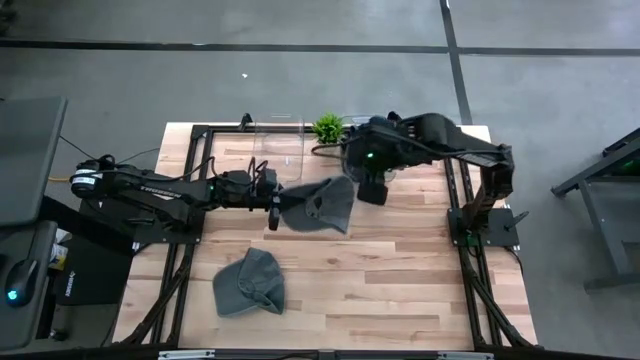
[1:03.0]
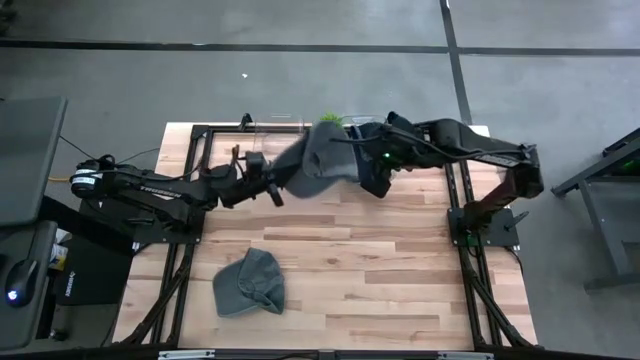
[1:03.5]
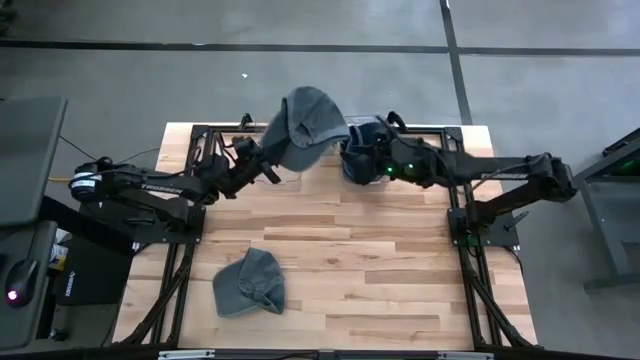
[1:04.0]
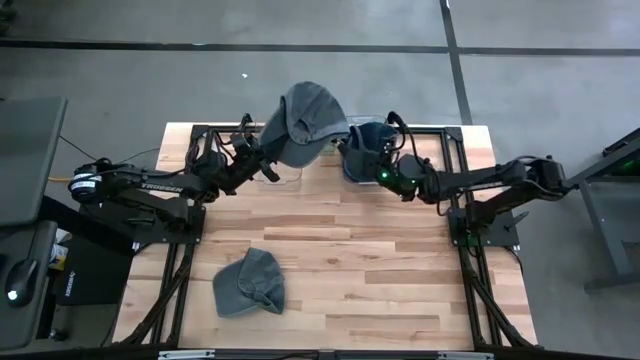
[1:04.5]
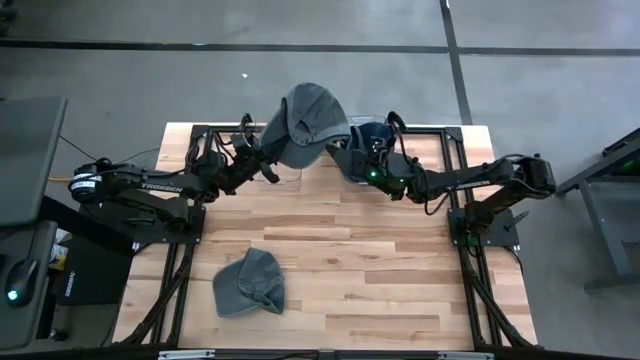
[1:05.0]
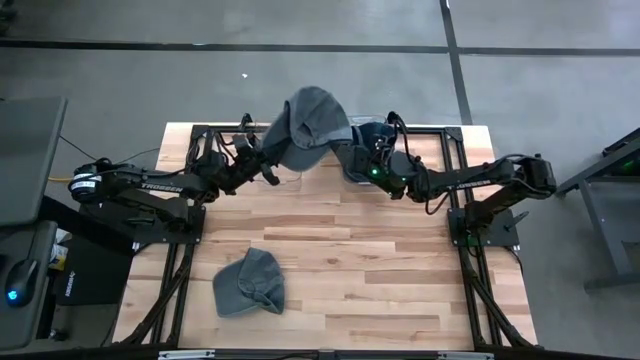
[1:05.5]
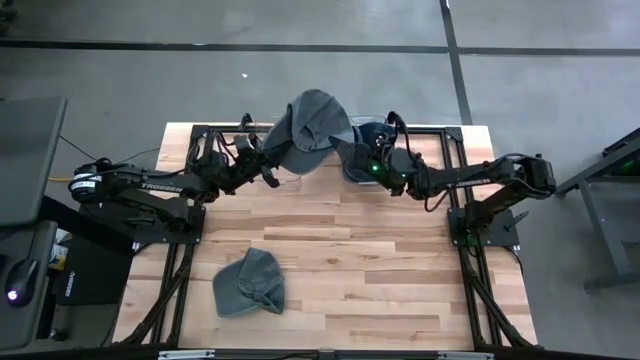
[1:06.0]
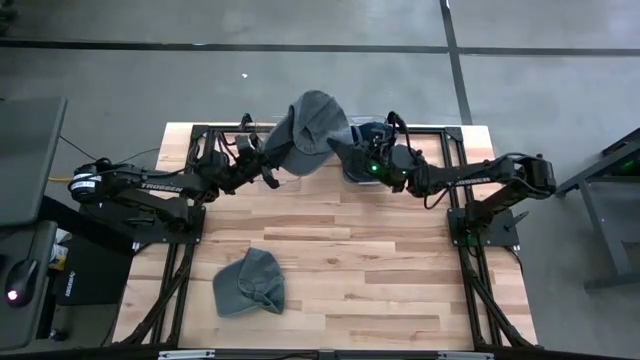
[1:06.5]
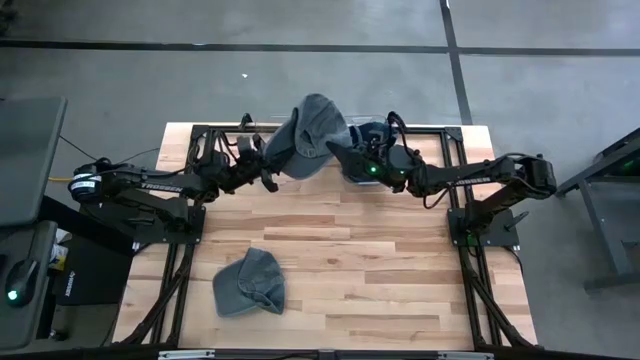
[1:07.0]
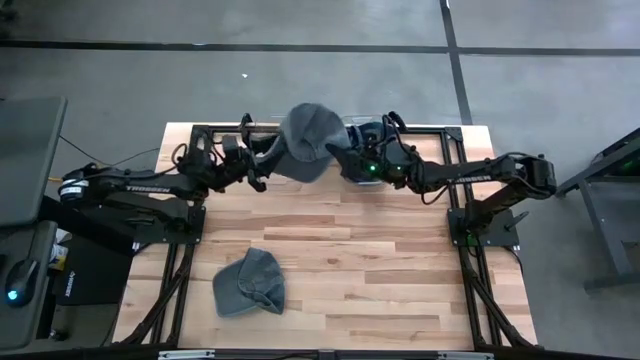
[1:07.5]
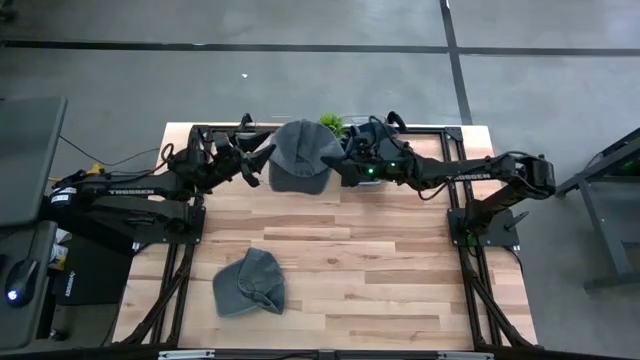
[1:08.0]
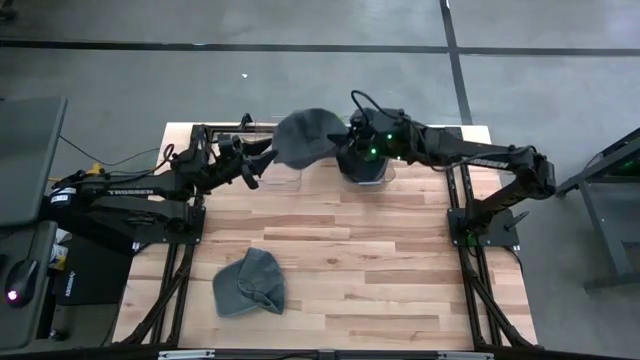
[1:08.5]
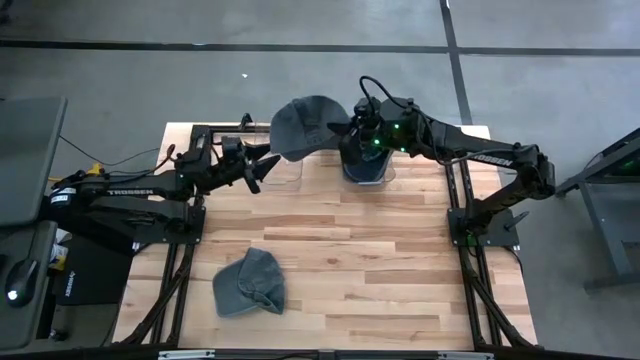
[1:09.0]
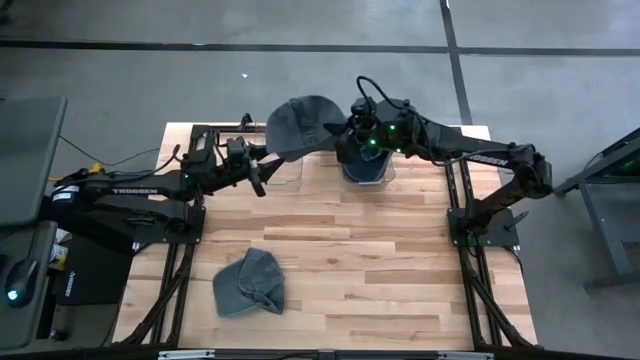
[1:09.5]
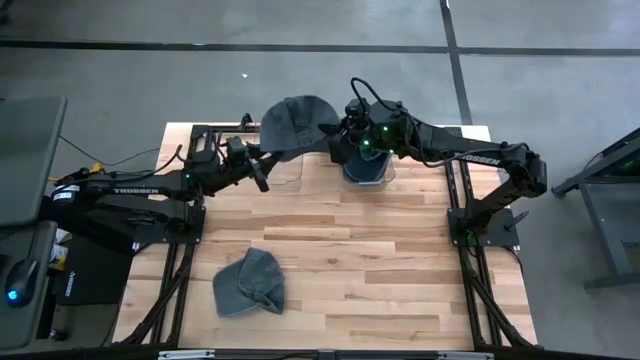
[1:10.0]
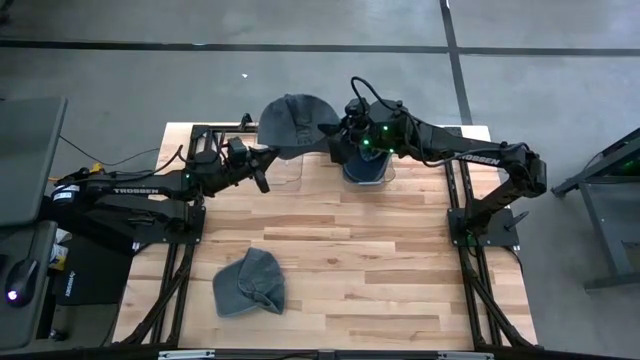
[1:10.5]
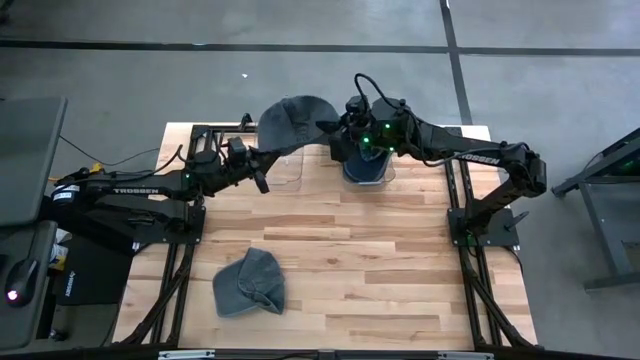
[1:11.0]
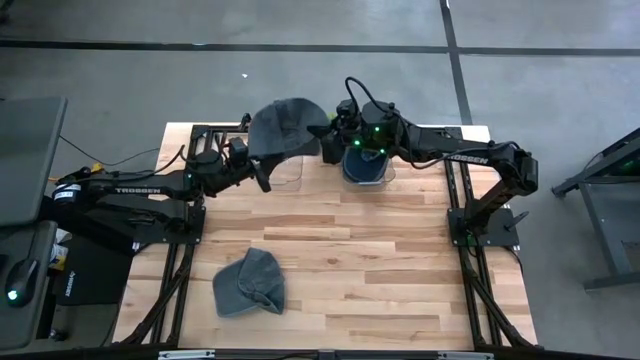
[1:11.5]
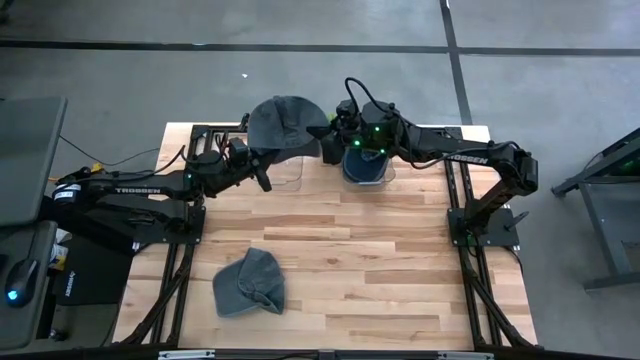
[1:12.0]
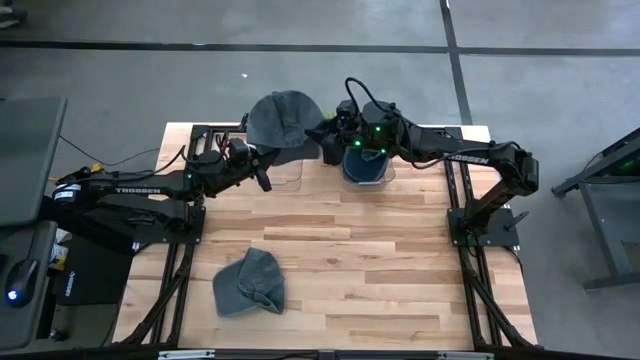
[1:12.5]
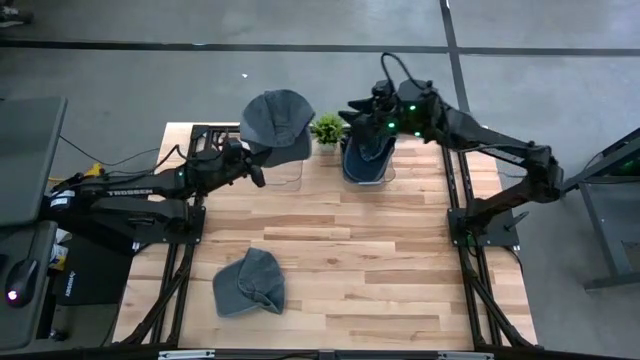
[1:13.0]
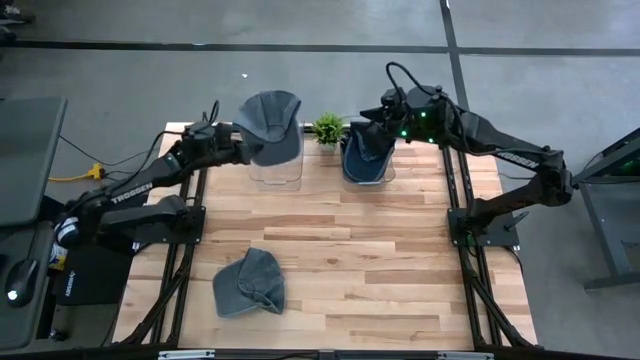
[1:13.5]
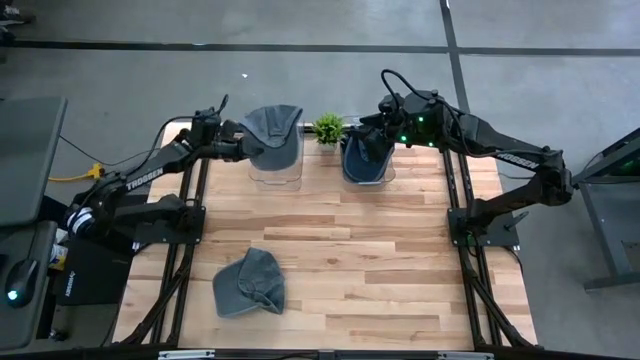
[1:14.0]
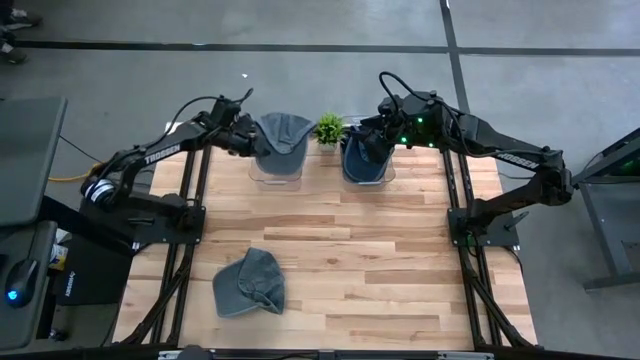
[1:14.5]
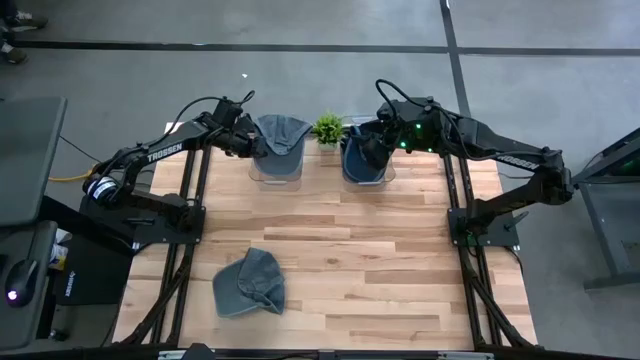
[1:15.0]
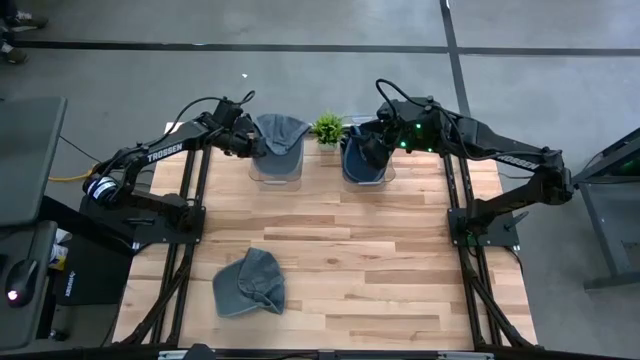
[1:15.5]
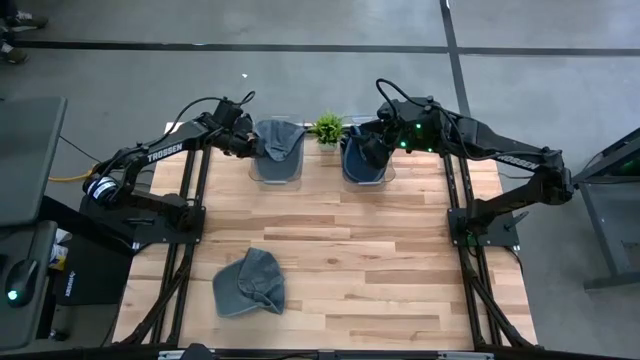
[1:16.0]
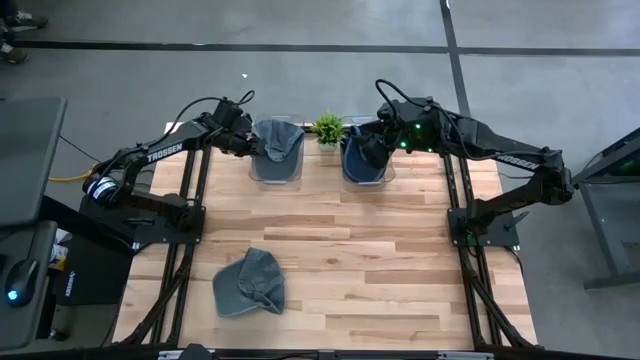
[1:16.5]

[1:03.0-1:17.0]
Task: Pick & Place hat
Put the top gray cap into the left transparent bin

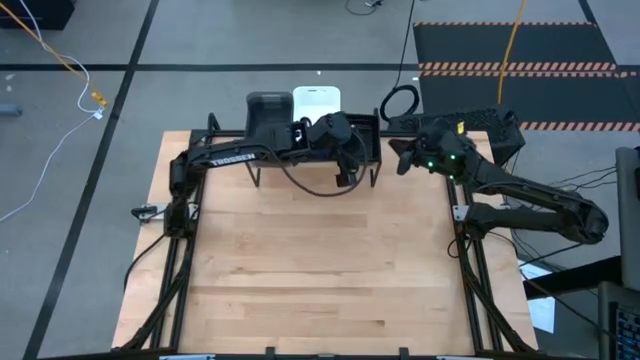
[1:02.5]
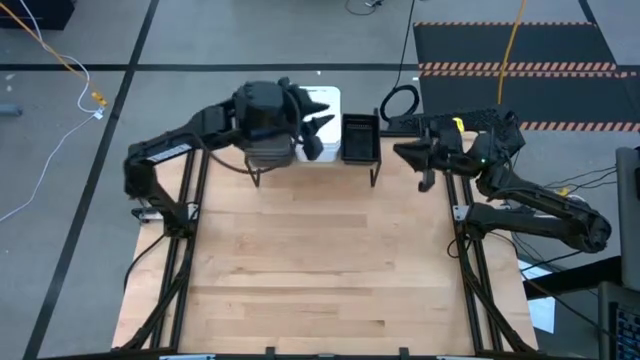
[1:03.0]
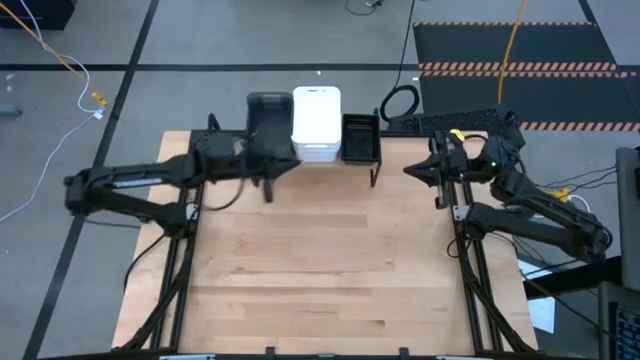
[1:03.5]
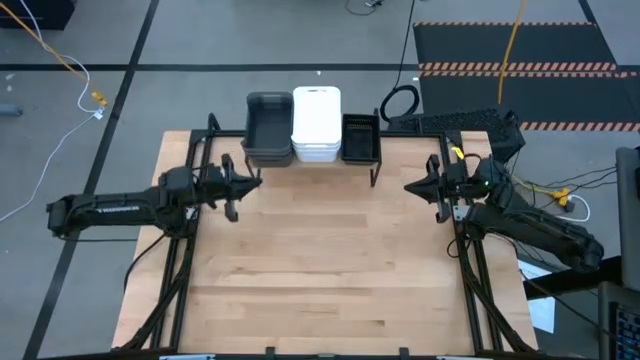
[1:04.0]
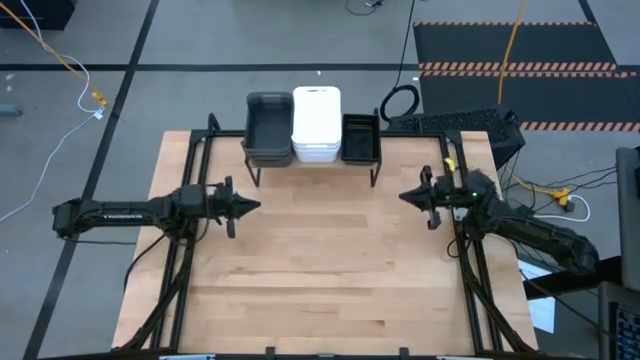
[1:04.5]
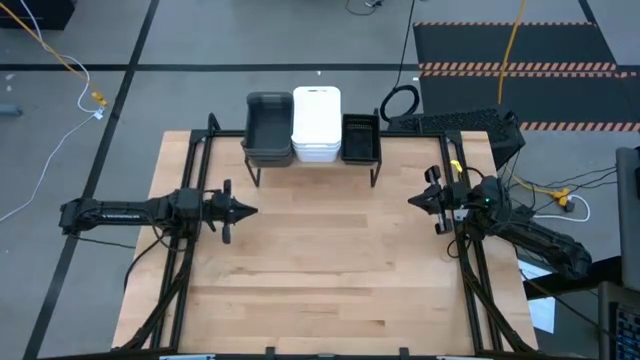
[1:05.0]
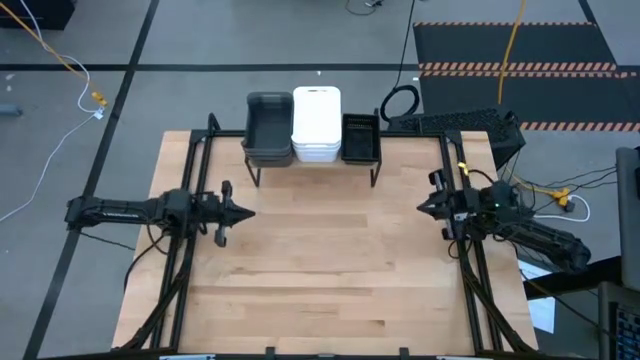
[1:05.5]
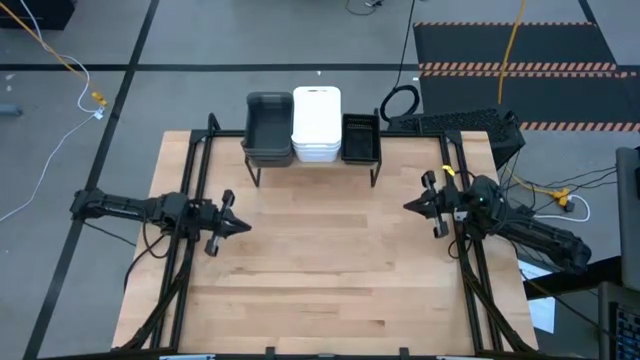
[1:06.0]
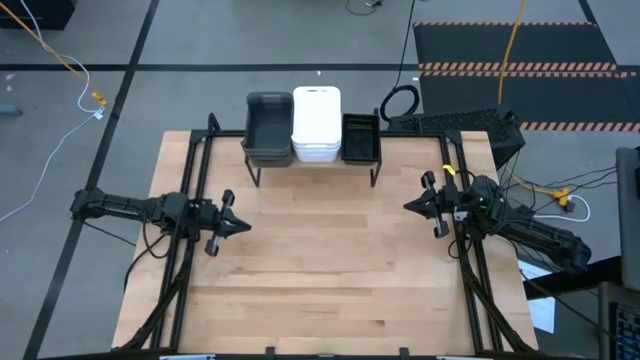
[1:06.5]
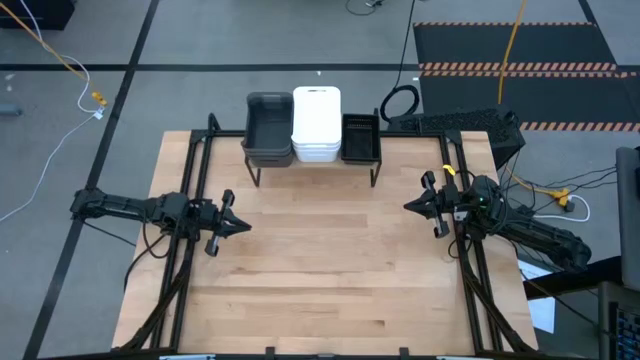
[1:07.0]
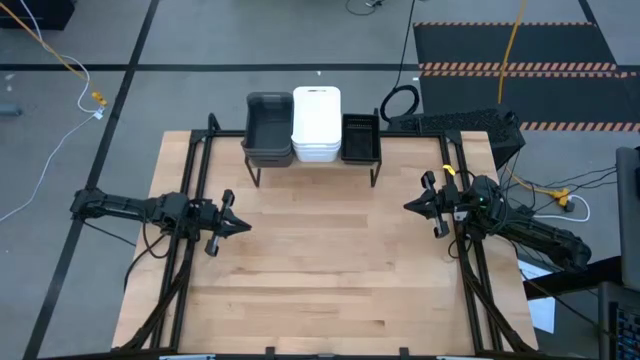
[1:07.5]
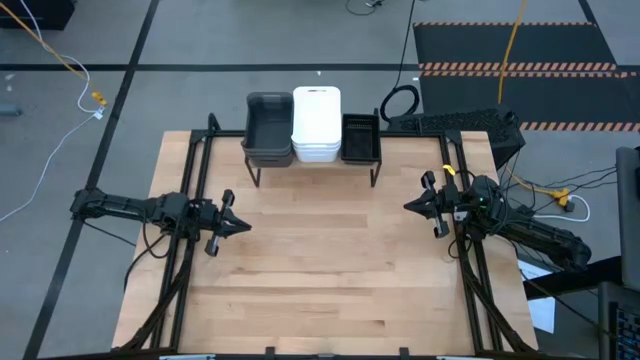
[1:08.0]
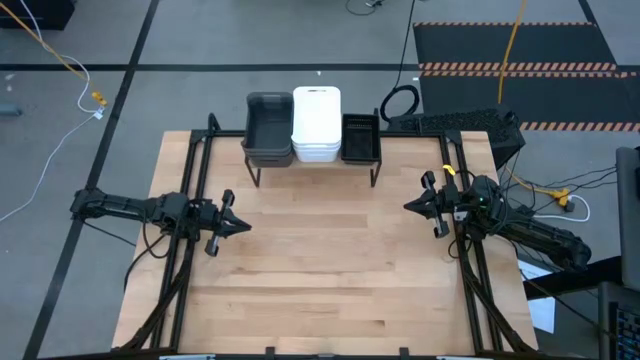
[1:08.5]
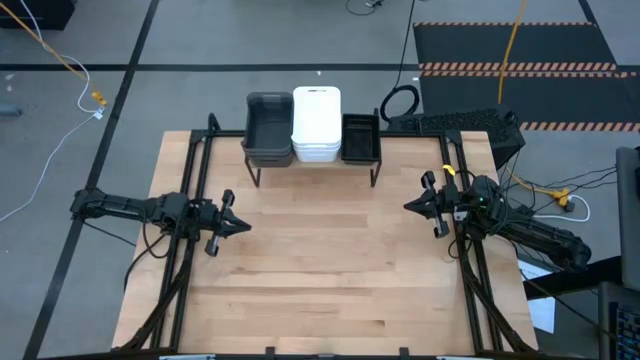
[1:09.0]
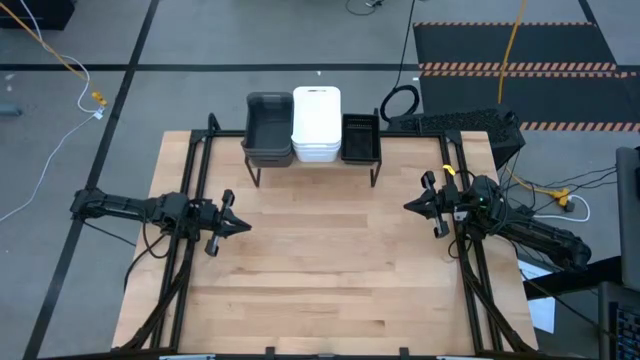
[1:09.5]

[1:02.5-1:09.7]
Task: Stack baskets on shelf by color
Return to Home Position
